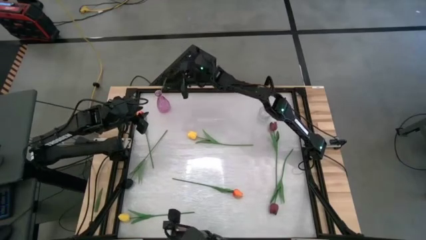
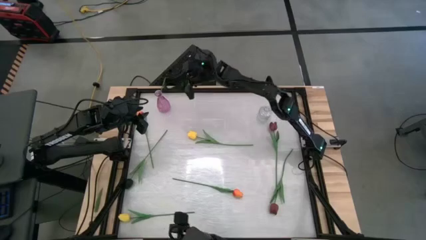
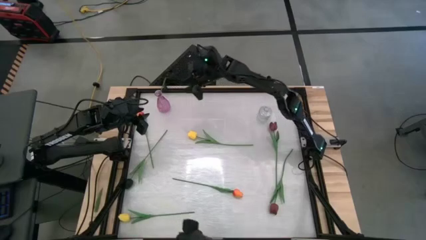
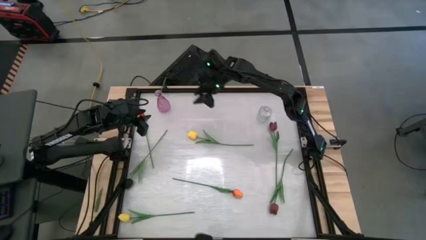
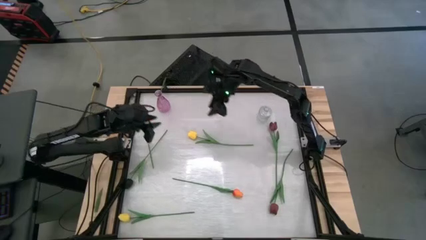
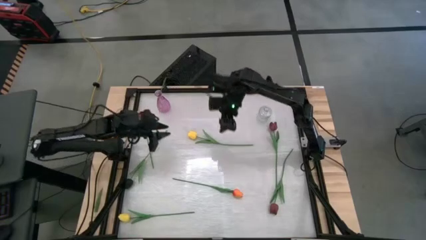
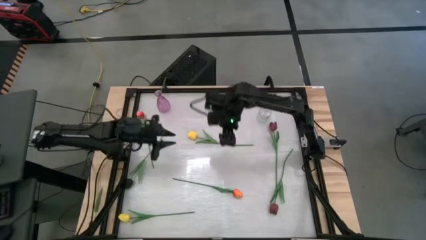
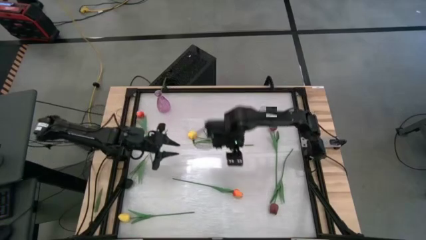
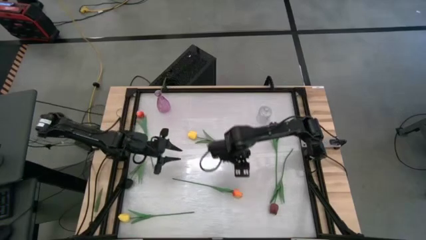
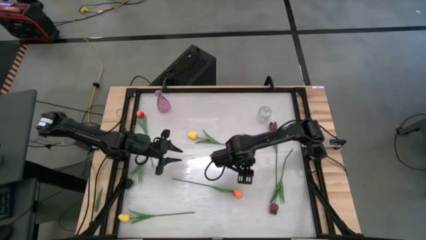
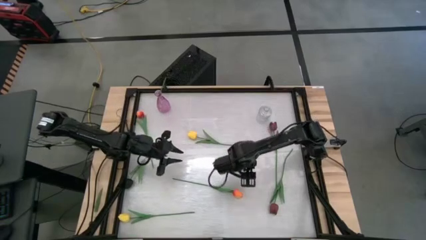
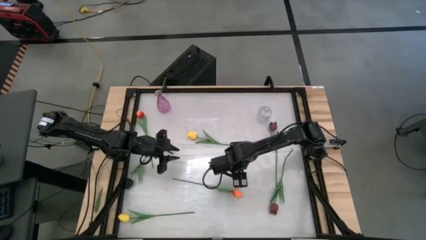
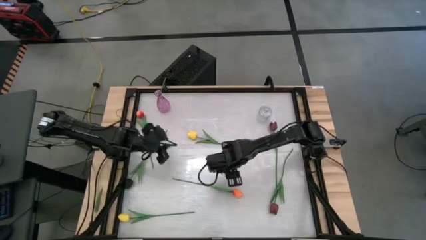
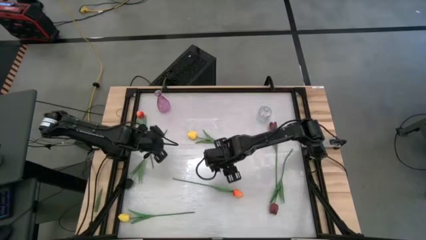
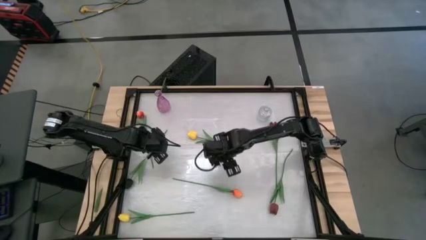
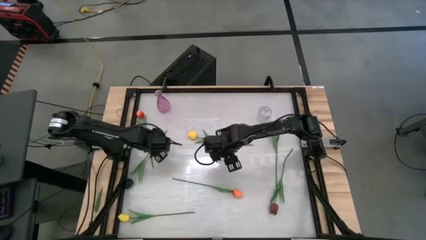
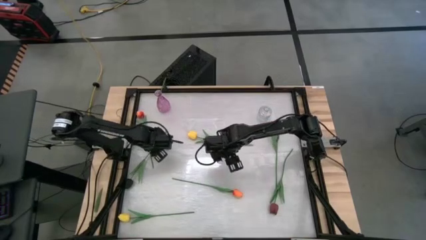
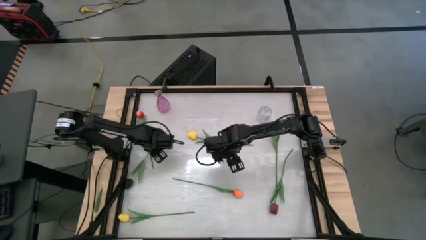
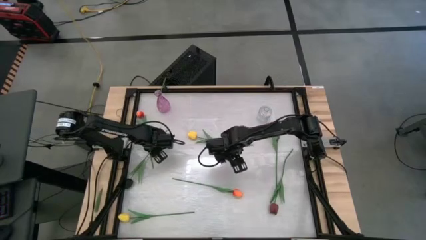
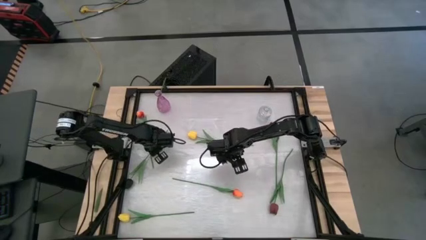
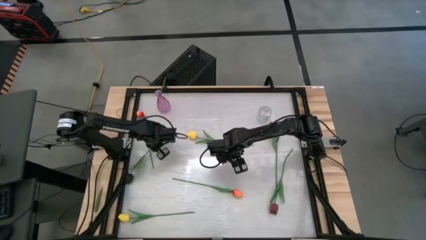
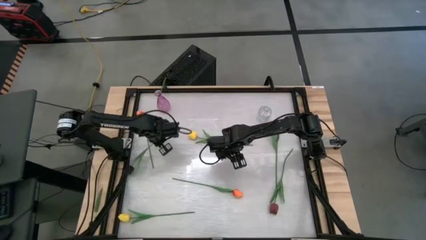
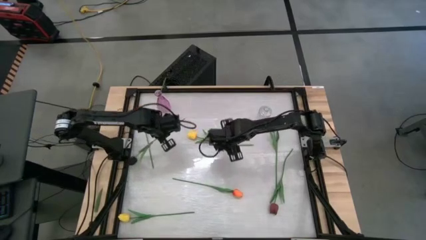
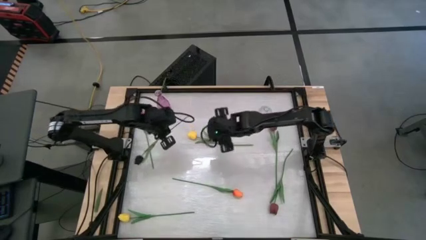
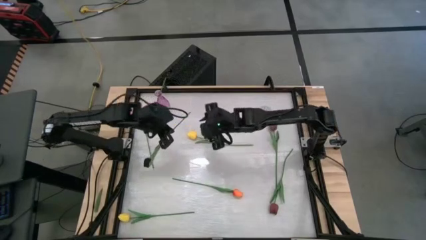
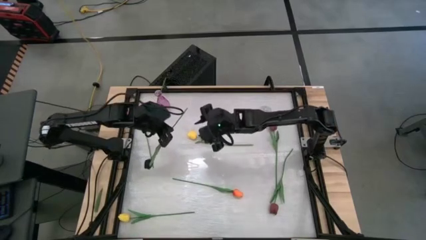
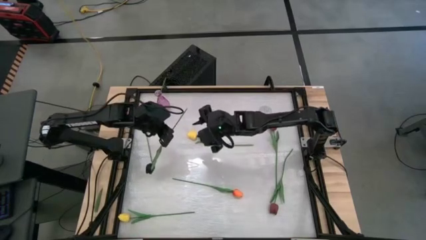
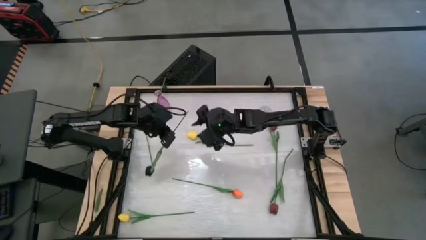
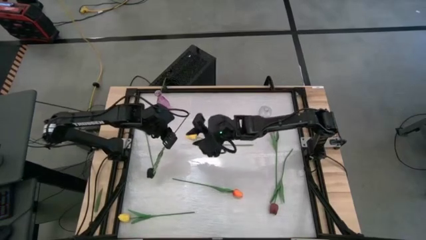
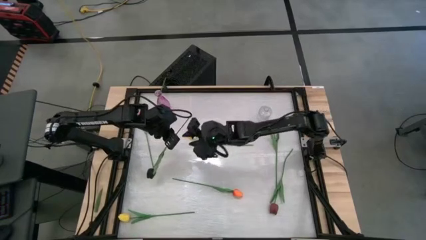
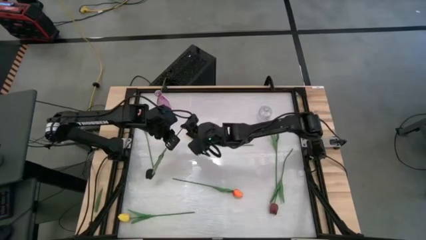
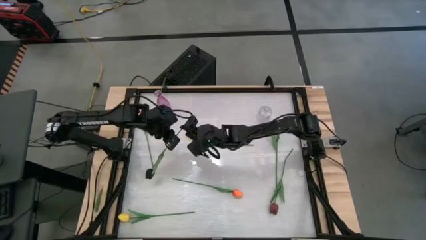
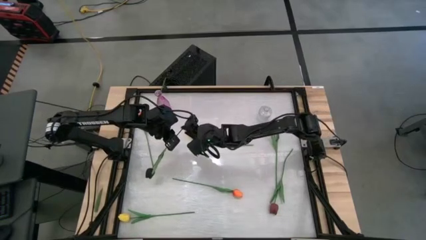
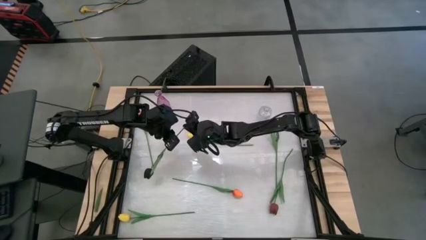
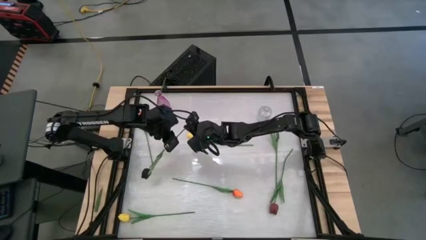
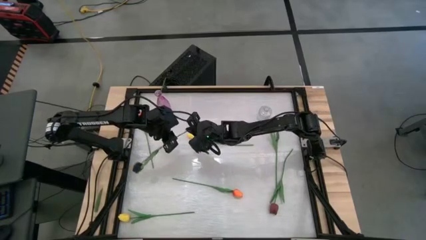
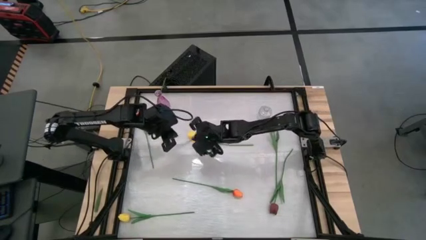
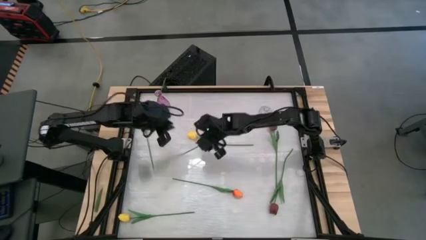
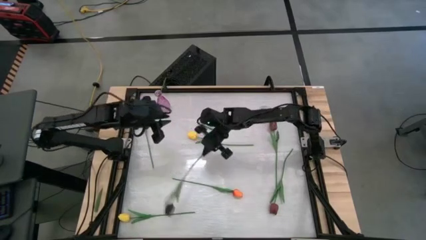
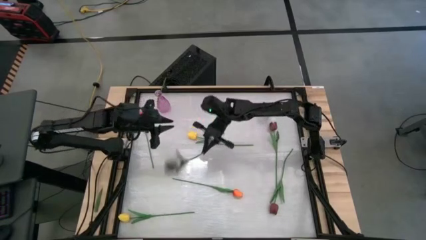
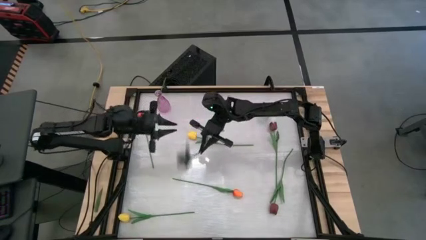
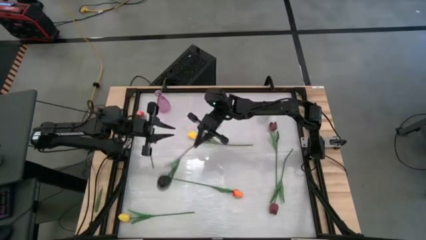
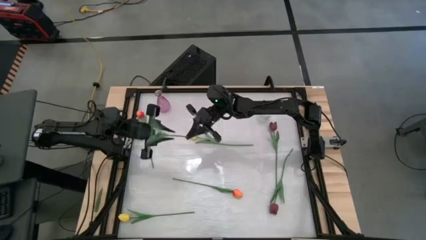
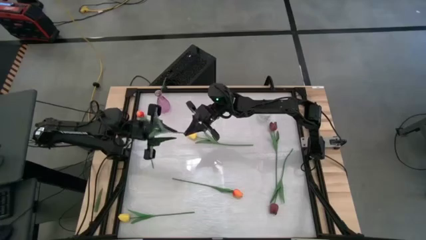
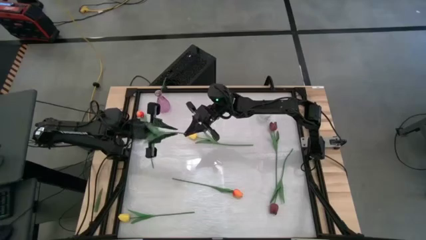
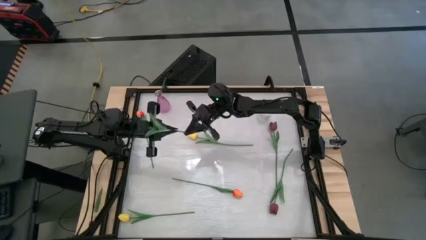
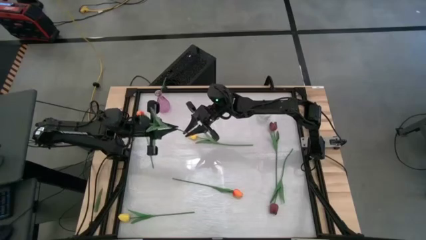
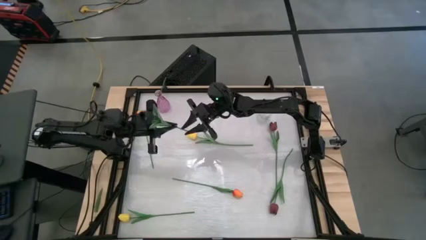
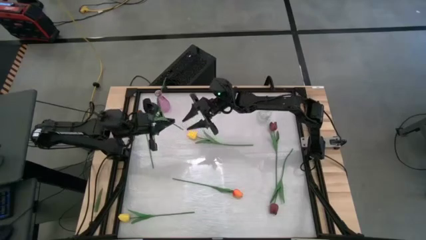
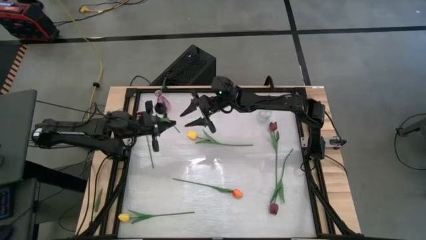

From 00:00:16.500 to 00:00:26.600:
Task: Sort flowers into vase by color
Put the black tulip into the violet vase
